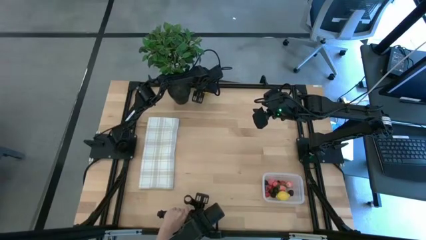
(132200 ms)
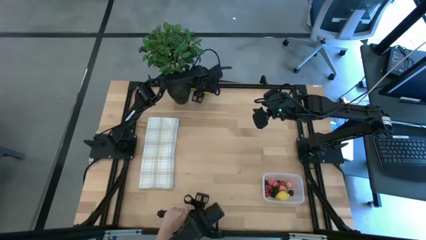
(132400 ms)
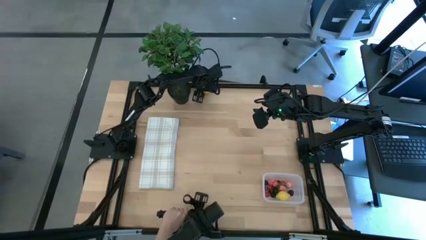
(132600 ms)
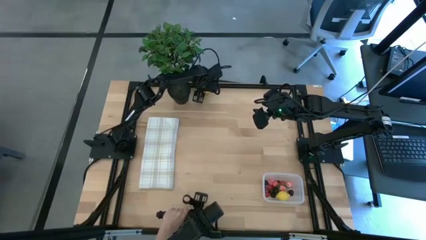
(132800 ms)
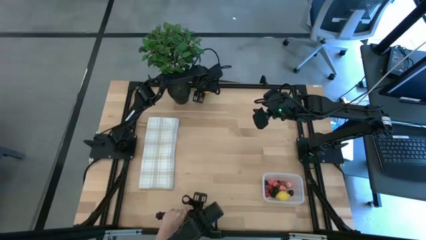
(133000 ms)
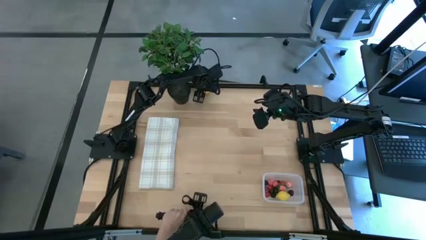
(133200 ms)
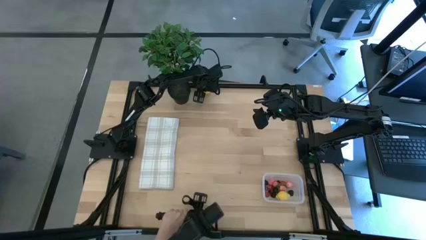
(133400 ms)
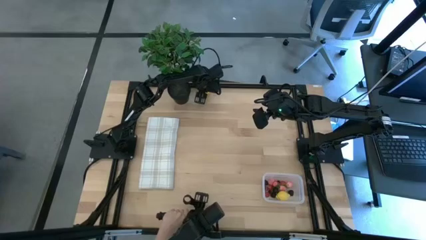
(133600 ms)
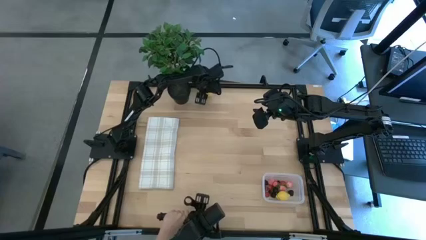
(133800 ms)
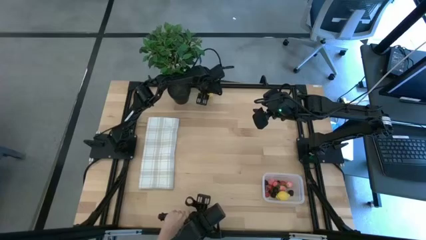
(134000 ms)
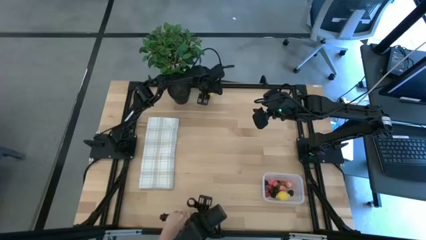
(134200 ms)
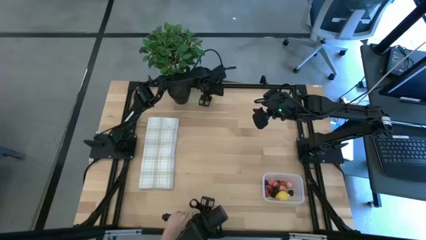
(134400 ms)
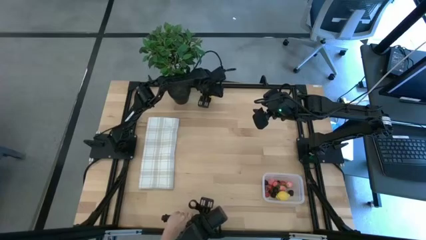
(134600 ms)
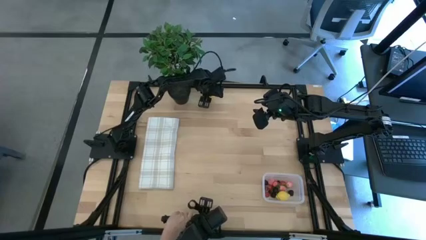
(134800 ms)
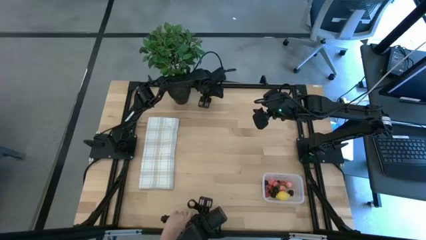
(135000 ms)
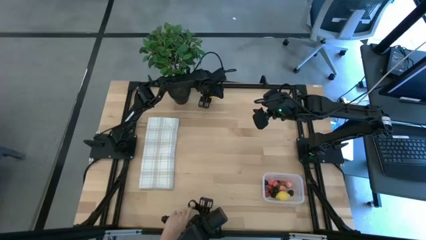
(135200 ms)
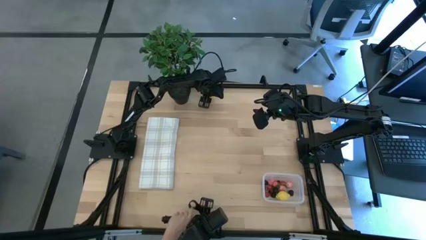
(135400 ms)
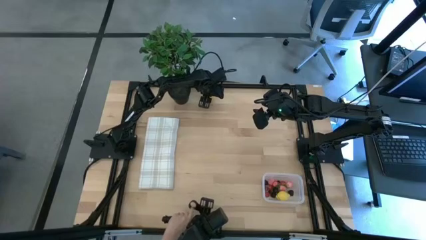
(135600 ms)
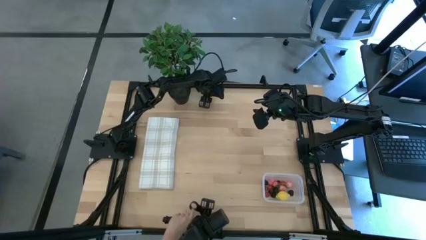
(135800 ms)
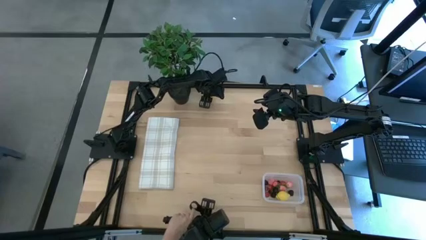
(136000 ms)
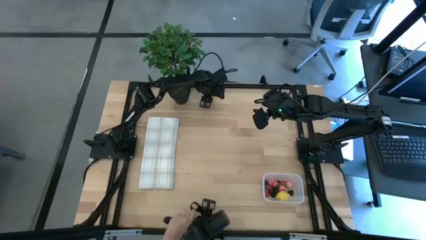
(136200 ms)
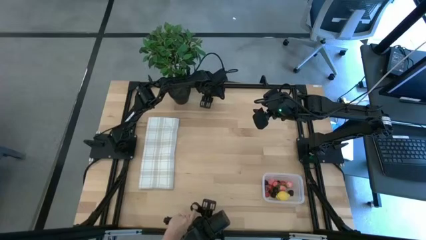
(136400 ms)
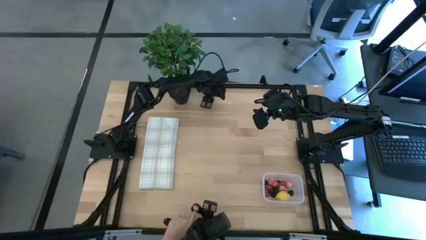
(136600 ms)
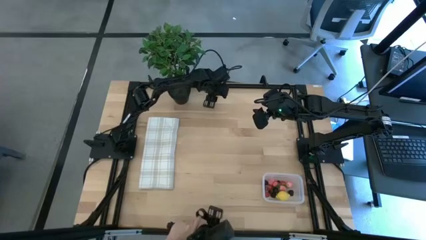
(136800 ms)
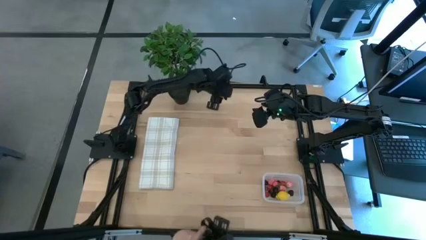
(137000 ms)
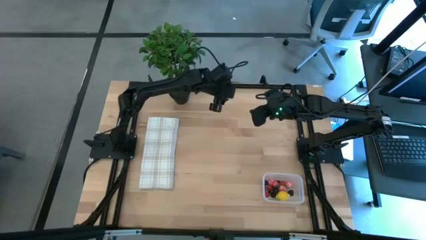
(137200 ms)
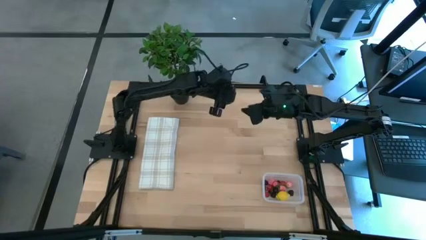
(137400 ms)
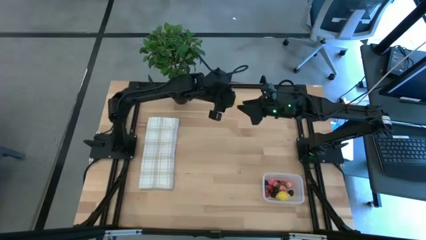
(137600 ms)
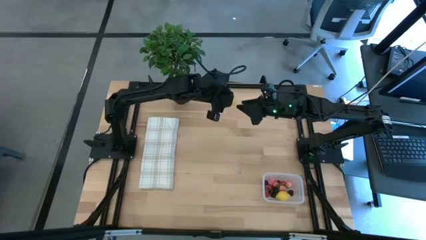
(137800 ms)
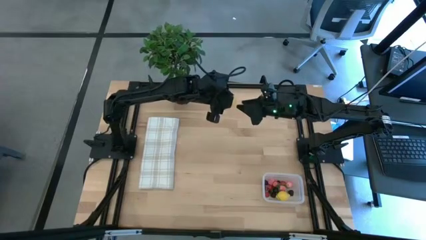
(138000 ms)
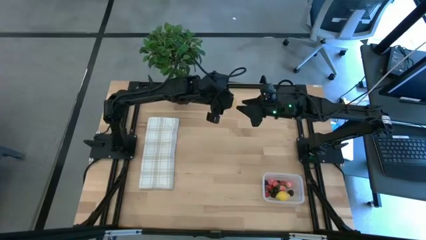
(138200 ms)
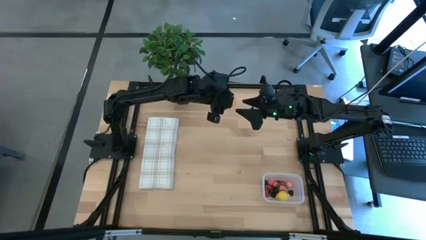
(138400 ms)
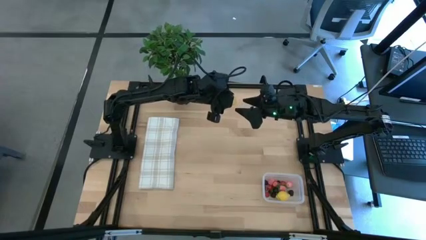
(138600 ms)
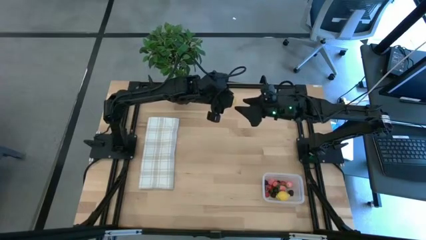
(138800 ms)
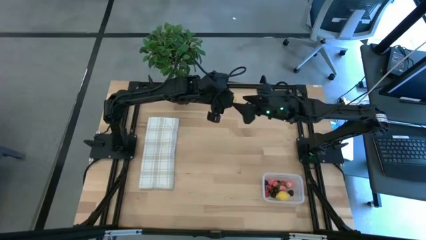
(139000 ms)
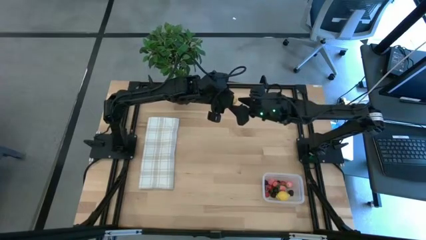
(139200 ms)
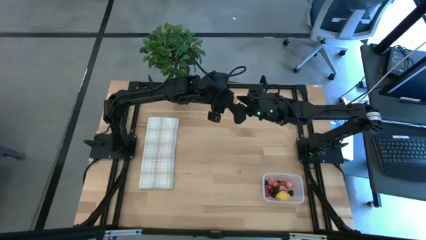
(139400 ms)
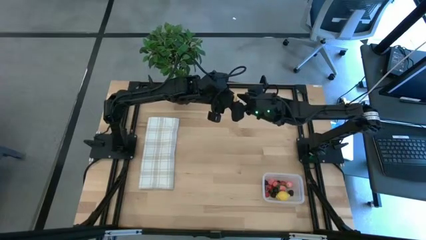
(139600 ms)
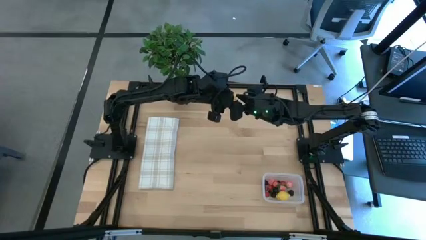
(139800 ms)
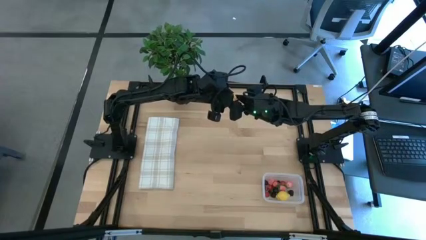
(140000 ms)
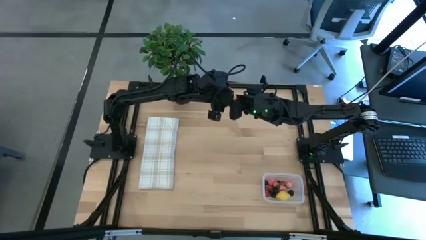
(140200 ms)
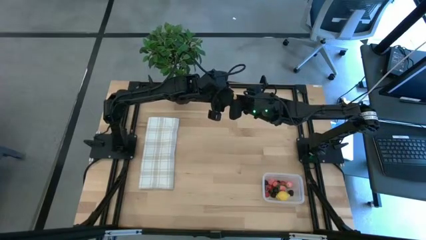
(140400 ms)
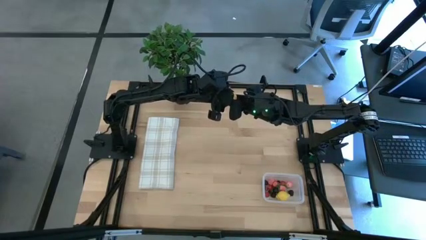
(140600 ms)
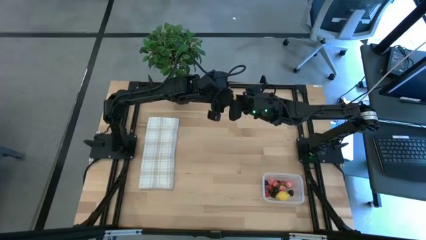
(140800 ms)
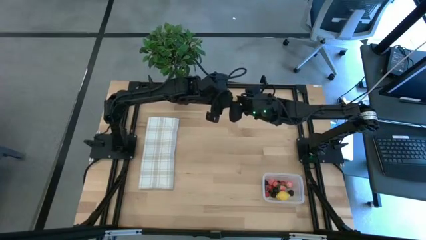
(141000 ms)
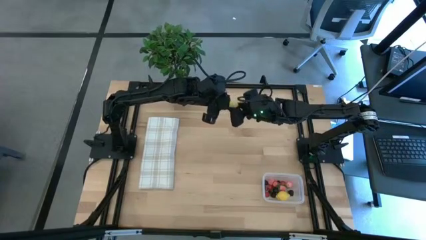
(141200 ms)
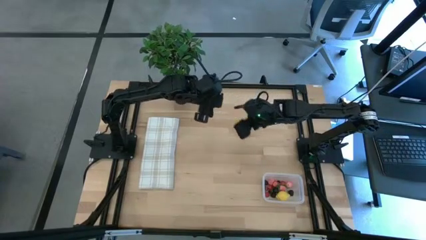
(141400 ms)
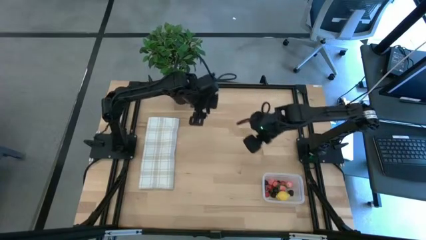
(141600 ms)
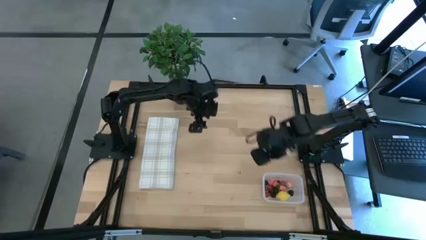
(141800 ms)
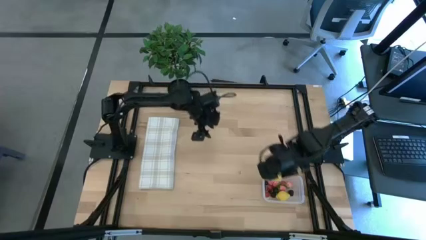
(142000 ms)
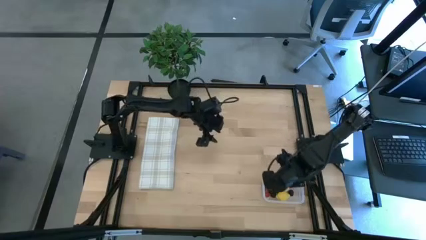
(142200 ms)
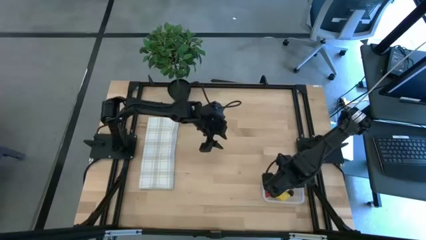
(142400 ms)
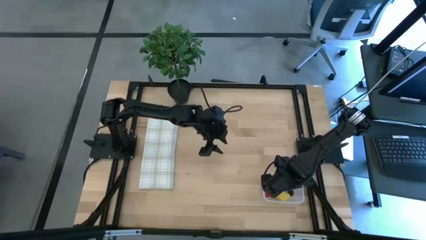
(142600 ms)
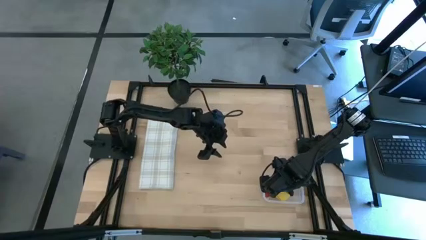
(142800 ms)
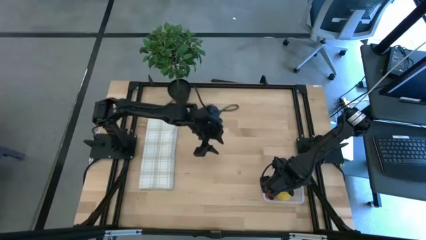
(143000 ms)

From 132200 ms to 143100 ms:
Task: Pick and placing Produce into tupperware
Put the yellow lemon into the transparent bin

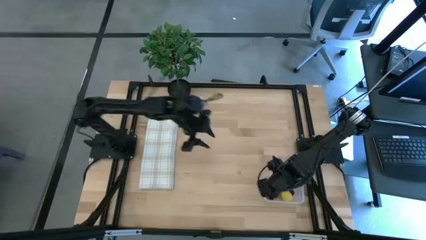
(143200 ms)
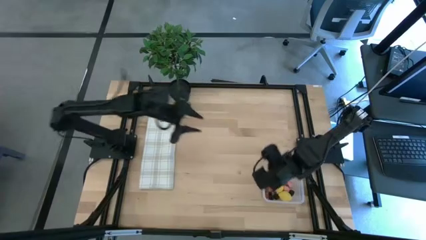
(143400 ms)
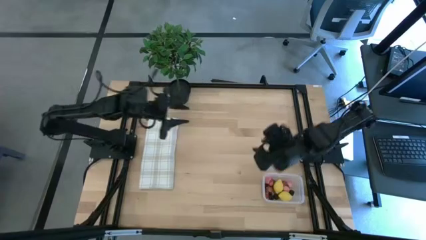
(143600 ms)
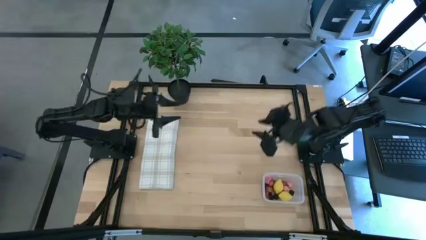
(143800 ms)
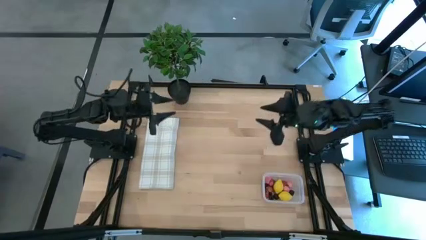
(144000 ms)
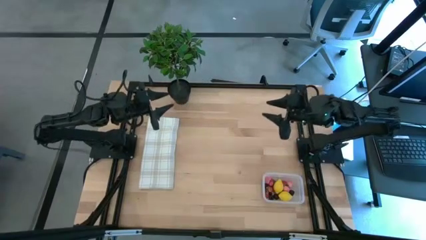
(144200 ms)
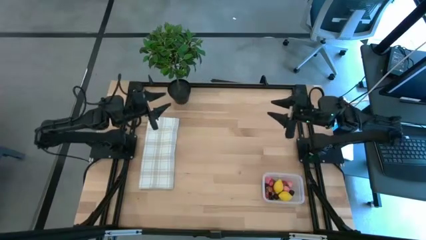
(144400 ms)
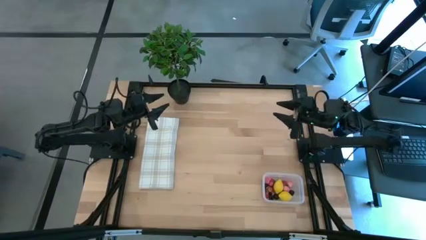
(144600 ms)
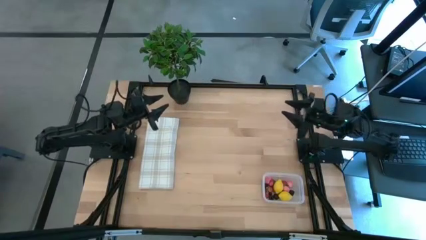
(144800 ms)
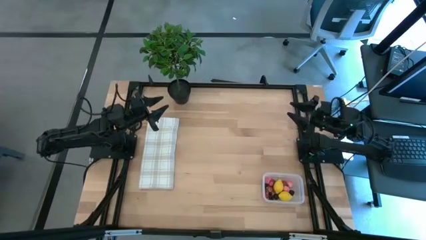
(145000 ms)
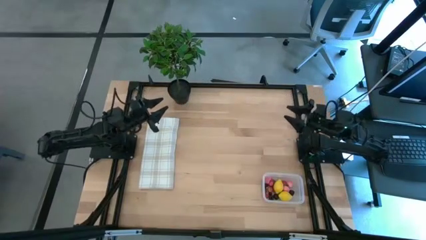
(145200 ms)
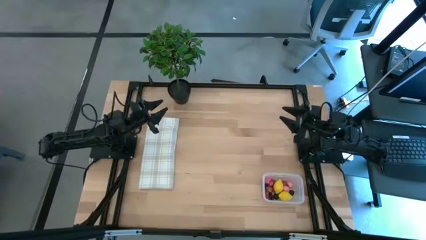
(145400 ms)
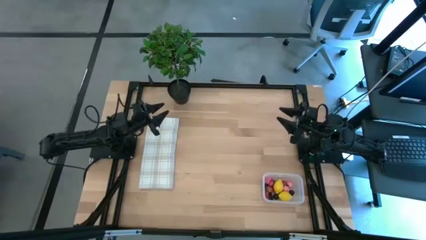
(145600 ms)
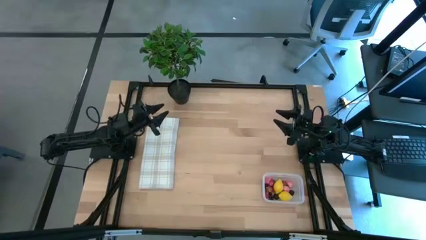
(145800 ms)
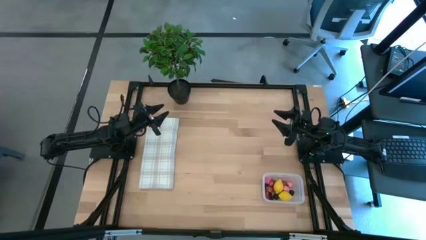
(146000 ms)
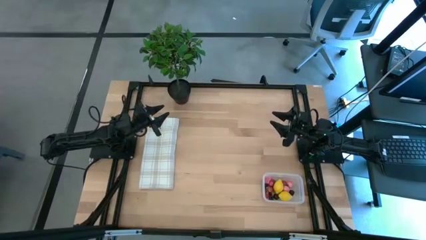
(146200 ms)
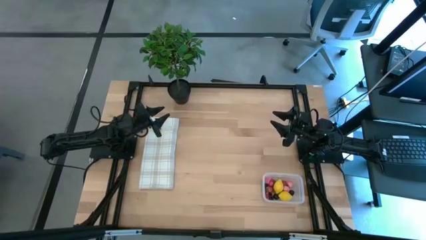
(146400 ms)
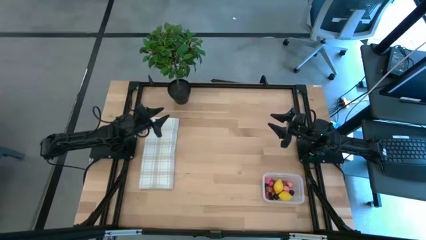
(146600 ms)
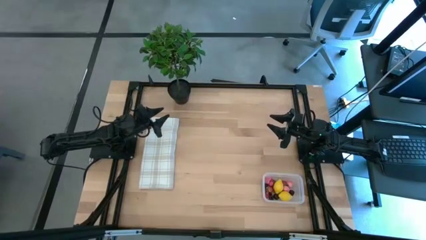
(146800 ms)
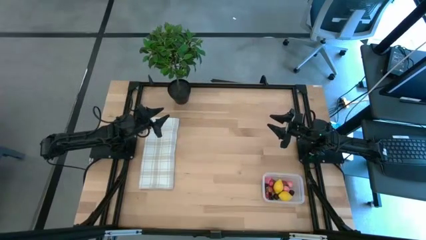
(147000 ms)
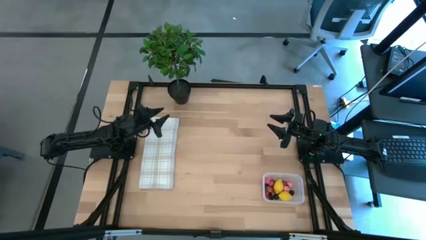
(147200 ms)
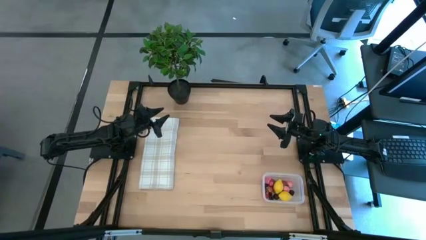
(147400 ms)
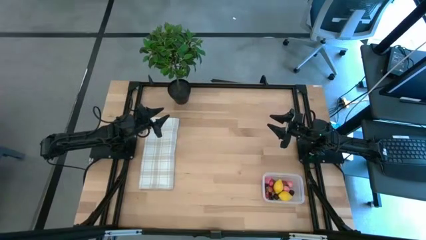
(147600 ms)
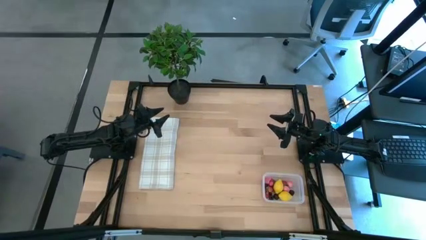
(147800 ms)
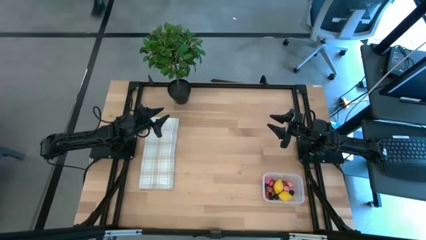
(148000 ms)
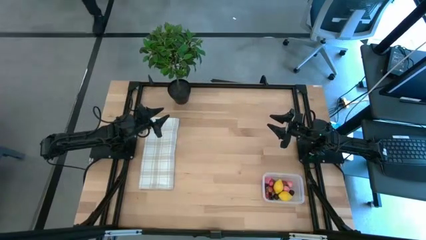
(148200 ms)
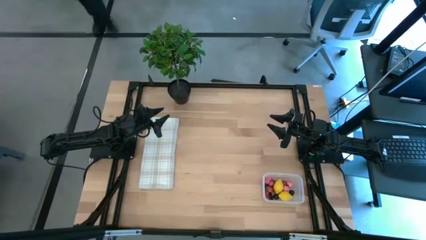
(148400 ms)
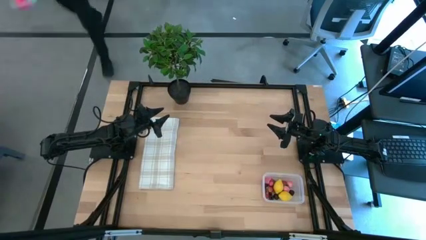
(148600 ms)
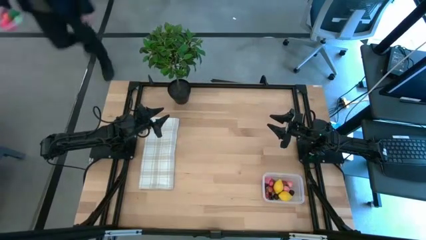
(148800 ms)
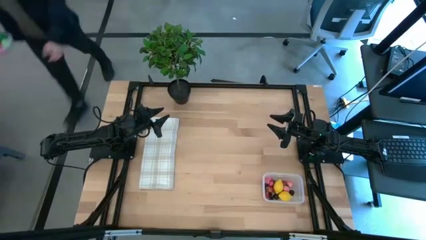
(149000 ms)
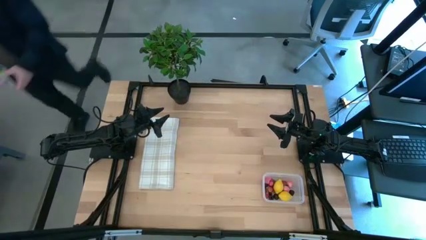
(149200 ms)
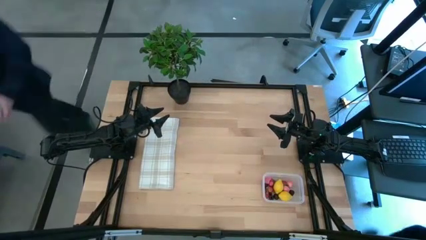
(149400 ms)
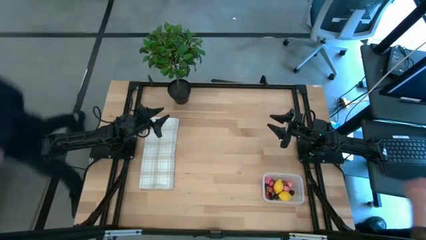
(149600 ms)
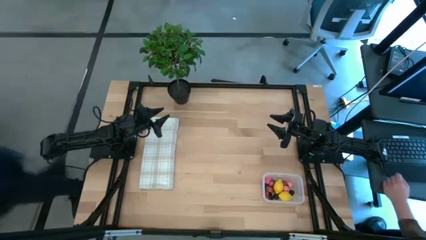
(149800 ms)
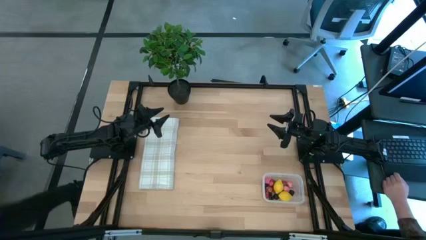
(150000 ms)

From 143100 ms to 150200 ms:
Return to Home Position
